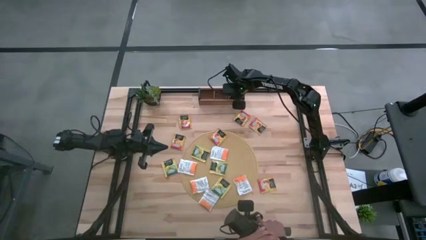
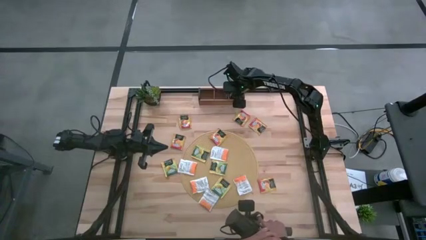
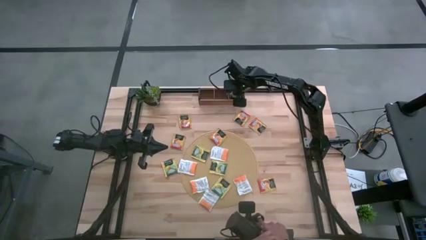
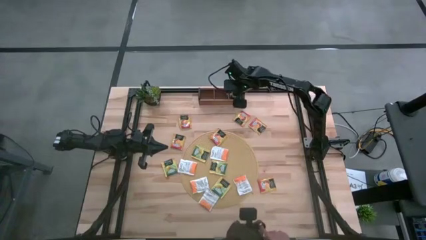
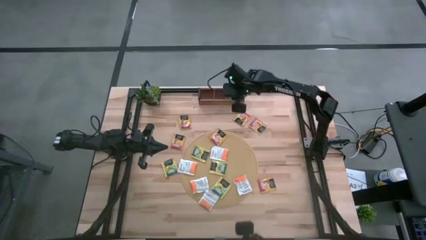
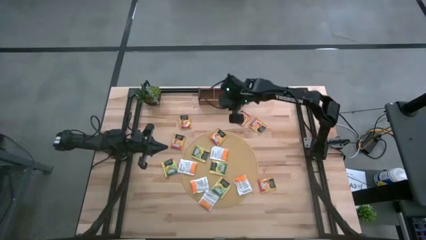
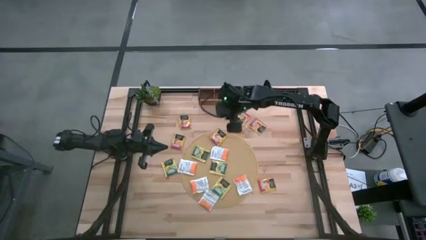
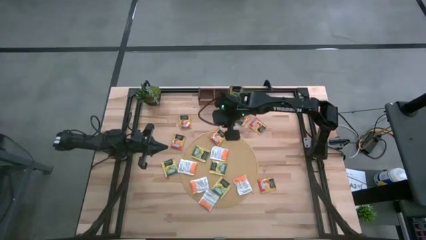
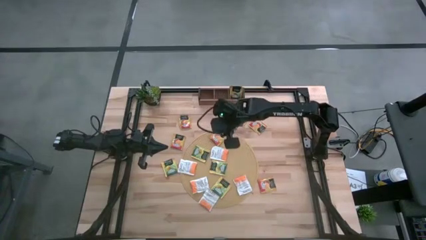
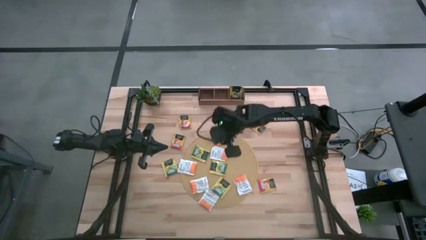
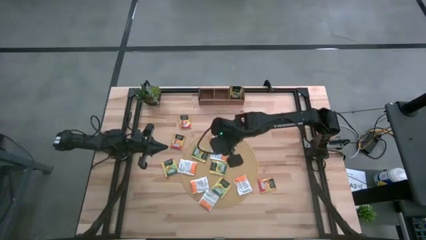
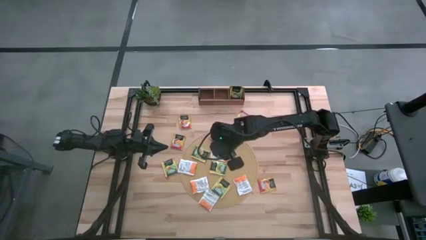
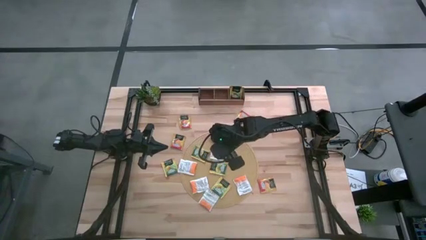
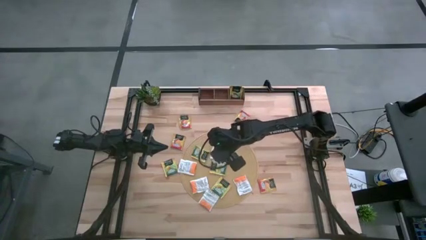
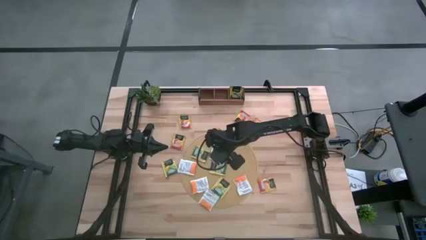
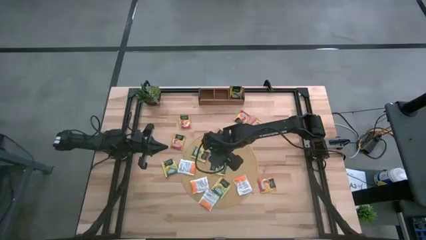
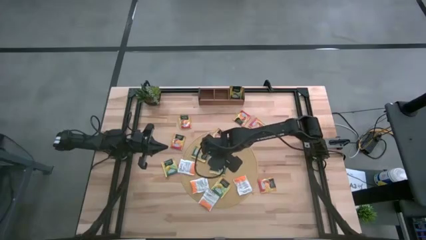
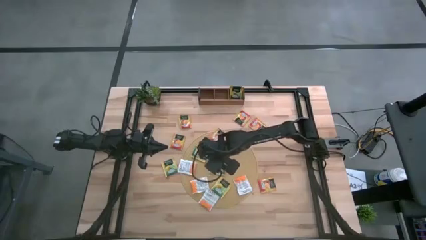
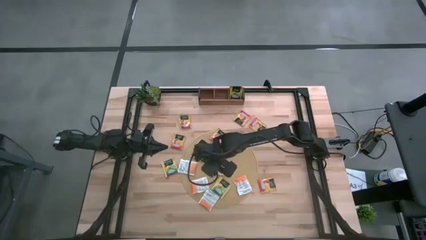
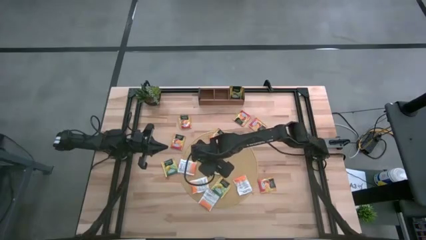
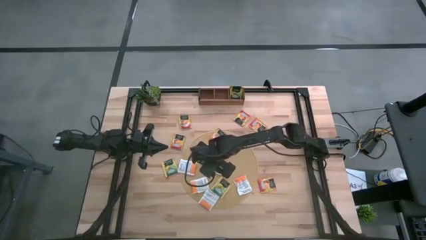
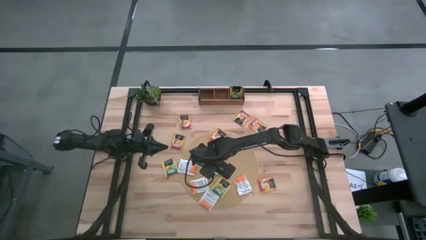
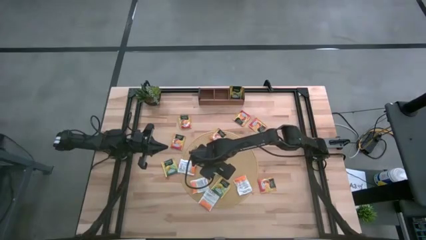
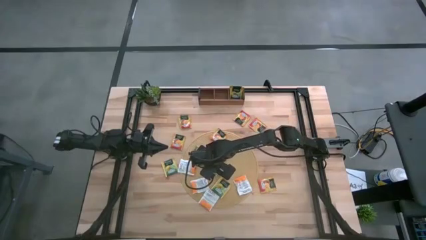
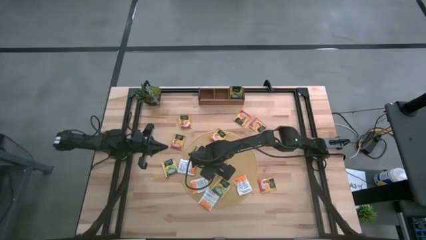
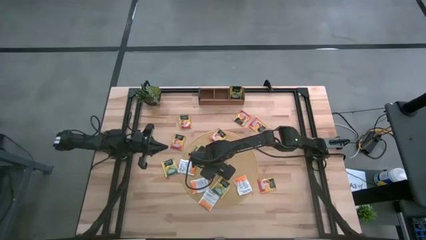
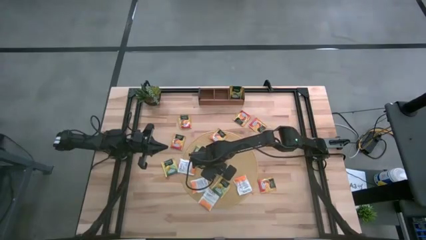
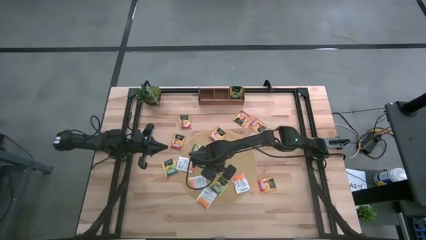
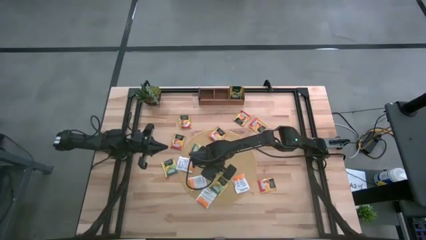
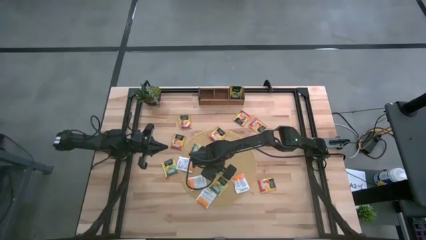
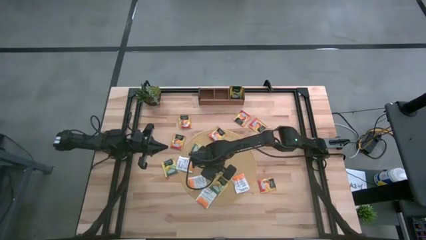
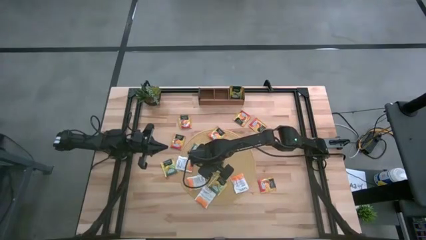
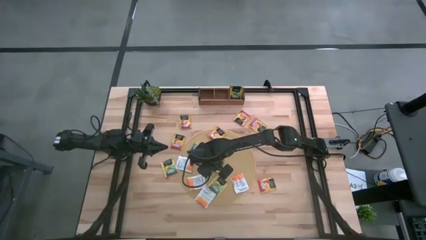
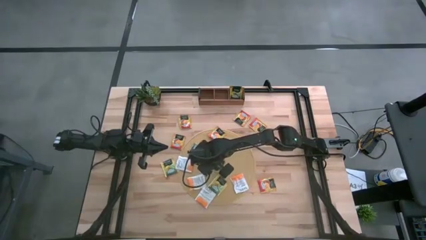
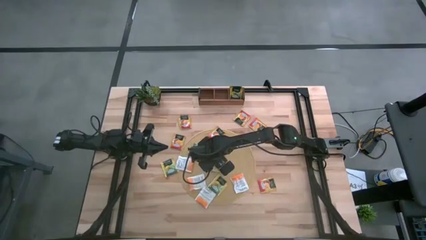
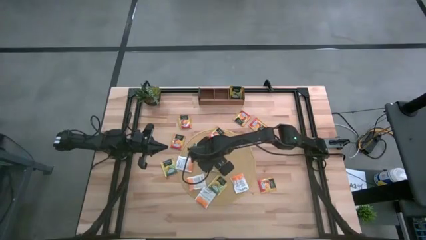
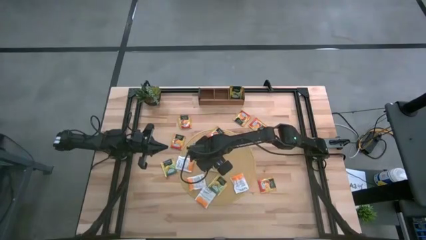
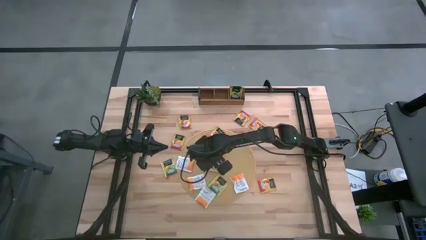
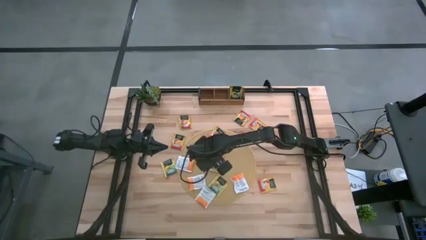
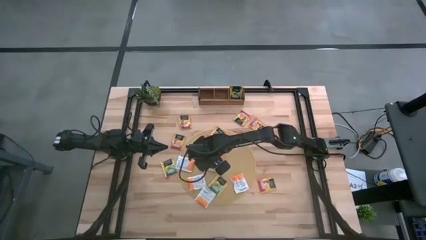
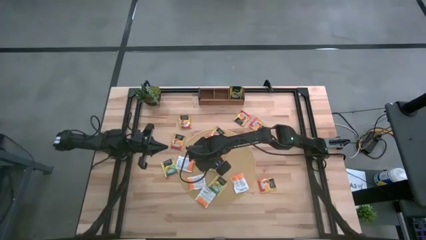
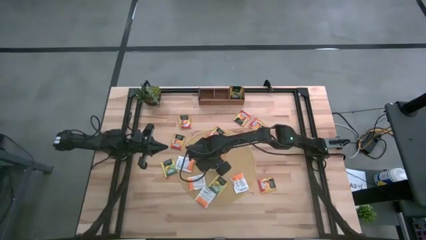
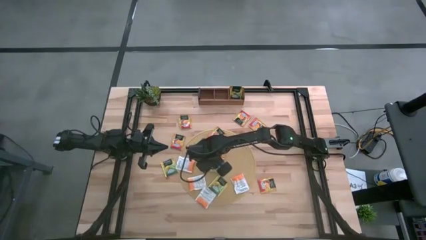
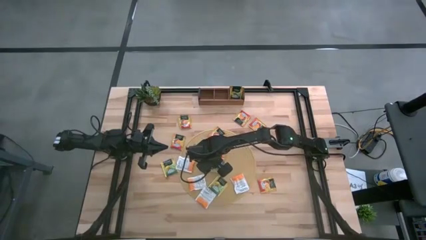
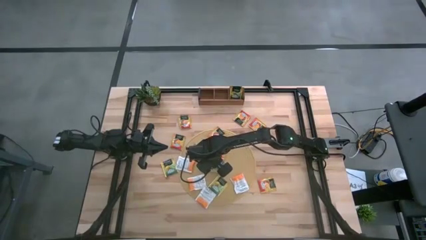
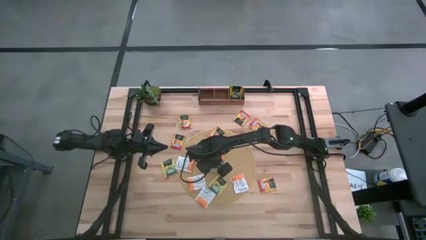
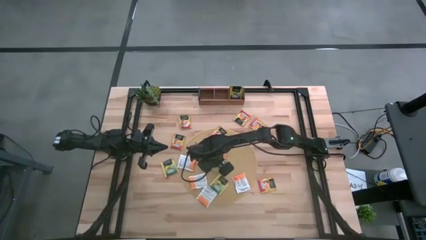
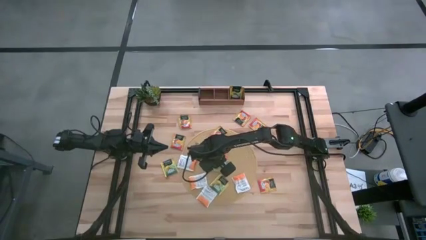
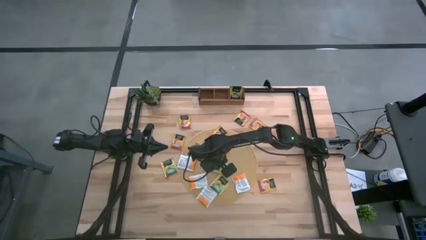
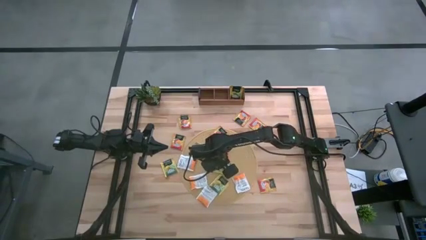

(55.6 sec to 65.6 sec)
Task: Pick & Place Tea
Put the yellow tea bag into the right section of the wooden organizer

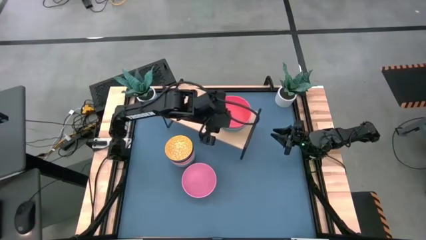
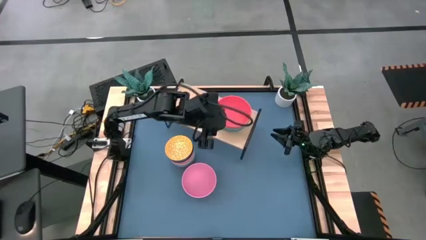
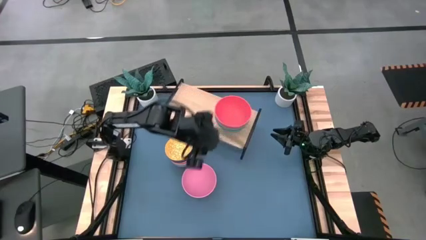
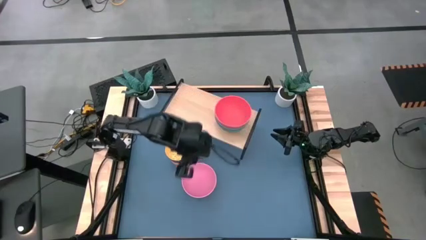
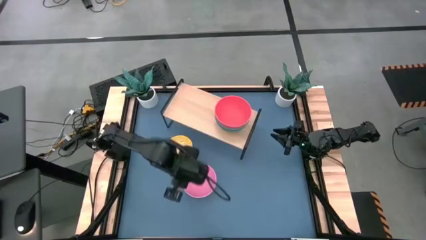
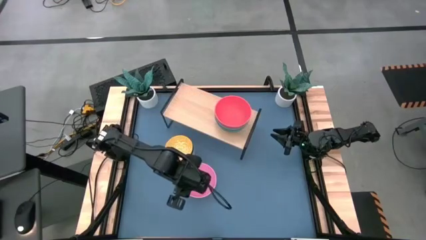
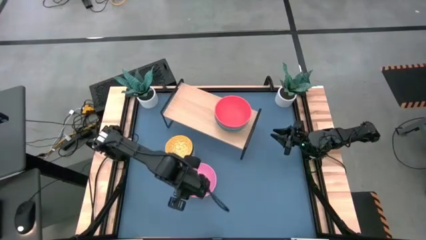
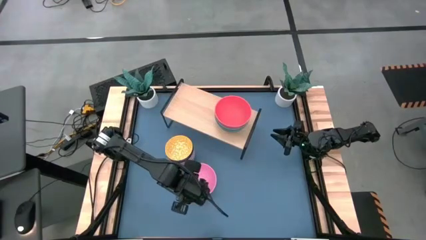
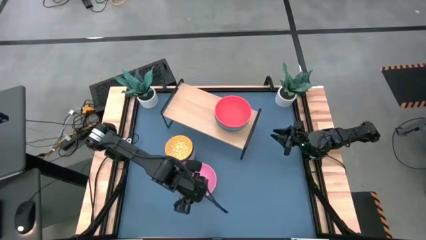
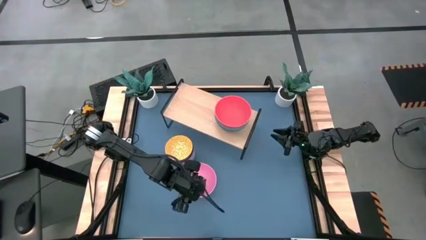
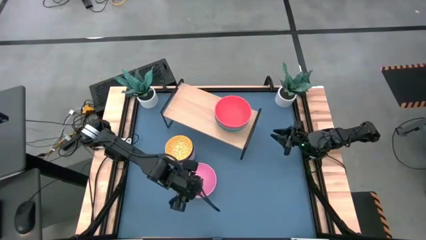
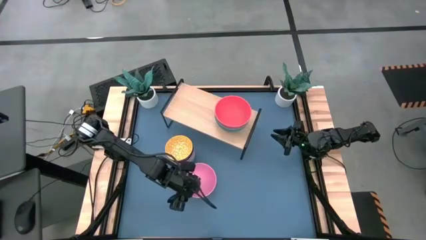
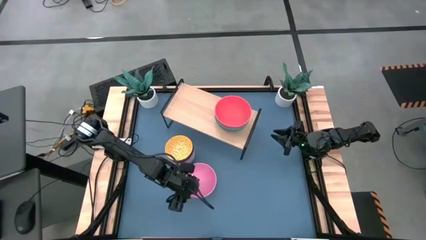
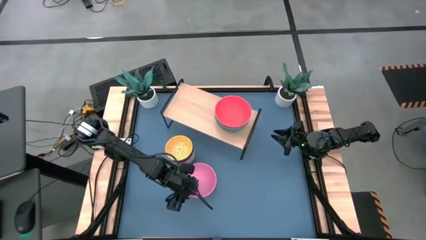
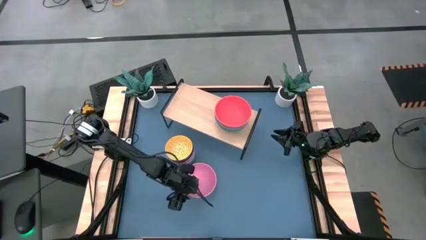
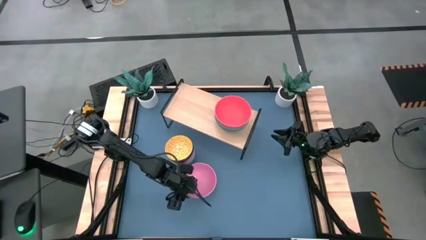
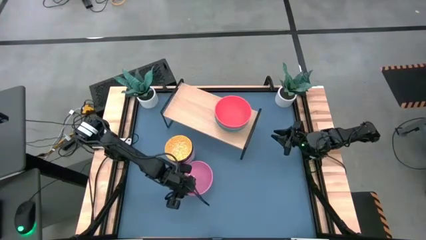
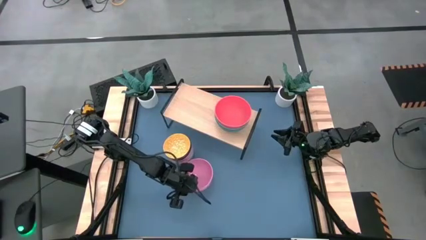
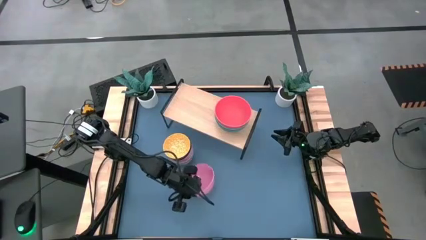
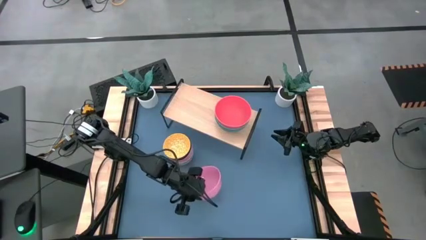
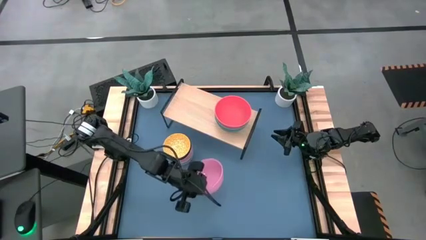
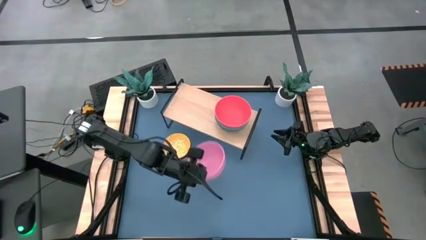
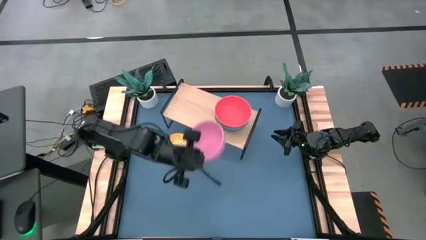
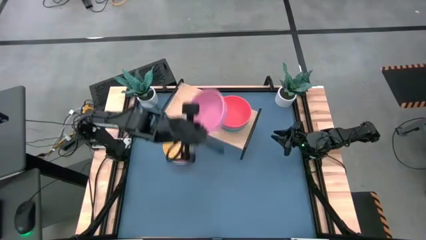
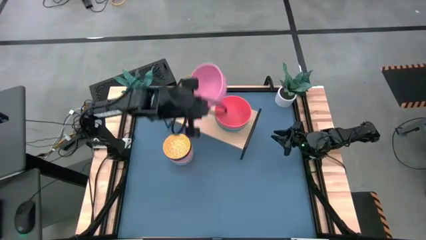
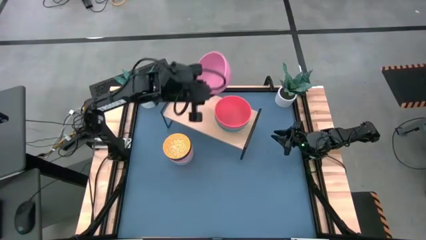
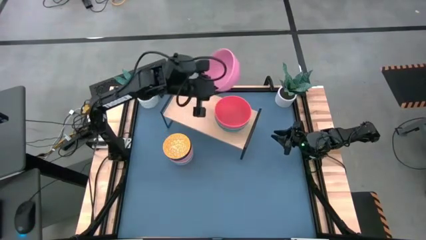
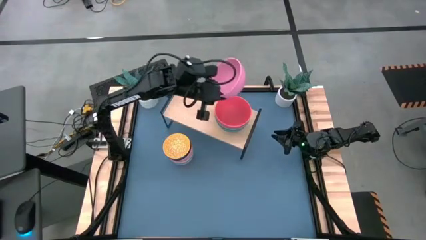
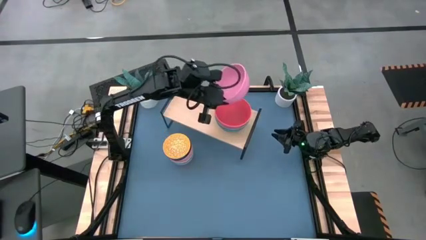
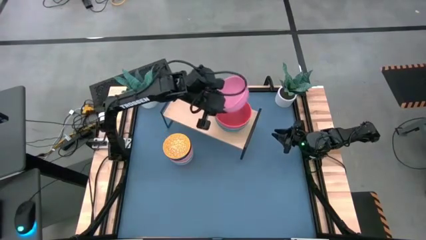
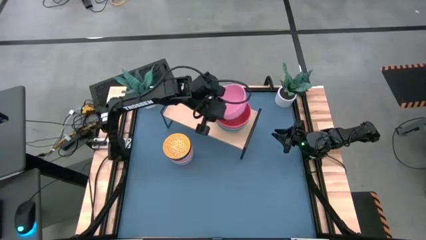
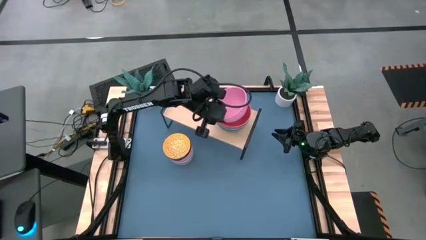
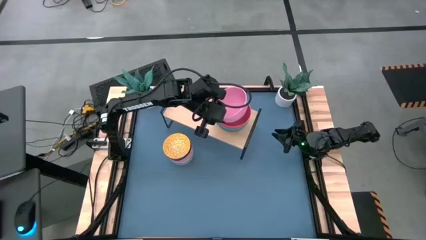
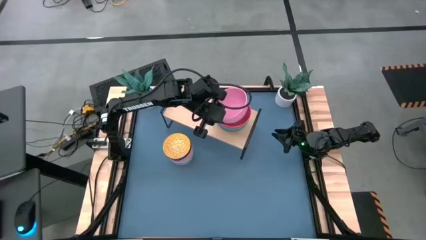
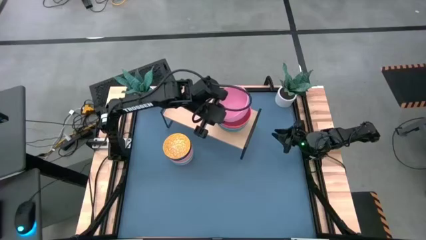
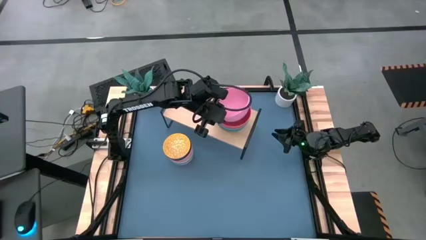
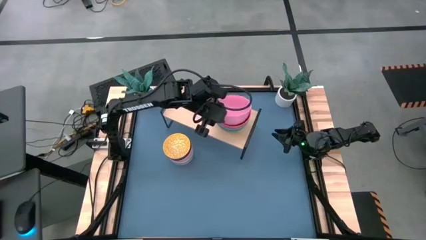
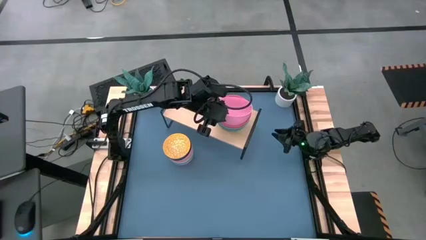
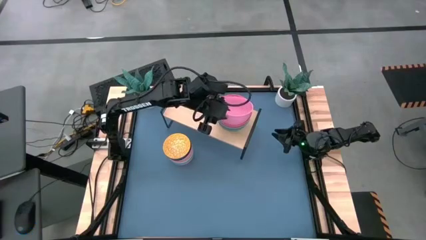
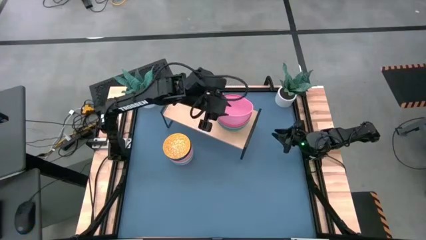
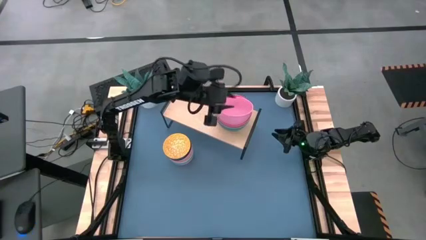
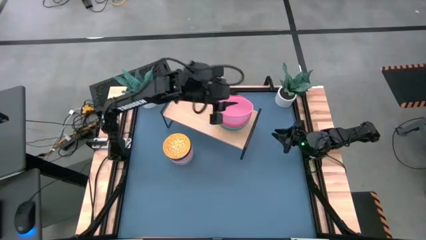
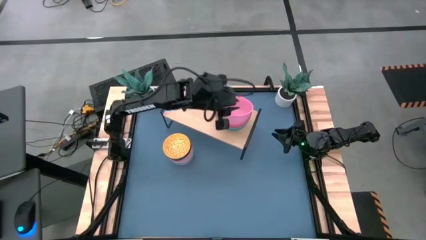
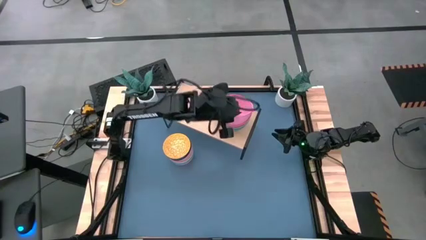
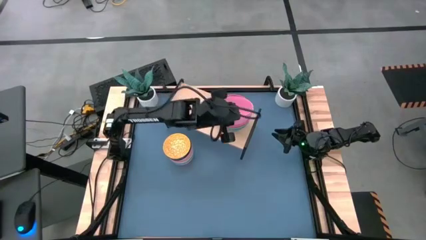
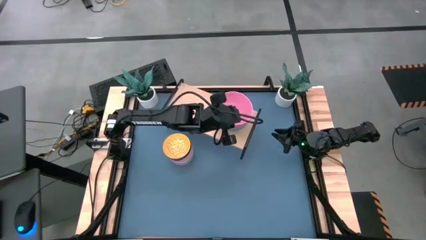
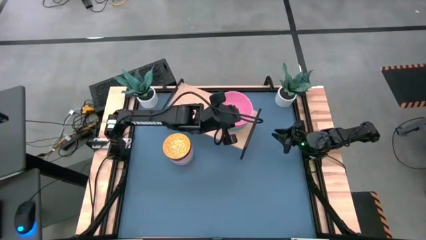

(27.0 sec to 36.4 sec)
Task: Place and stack bowls onto a shelf
Stack the pink bowl onto the orange bowl on the shelf
